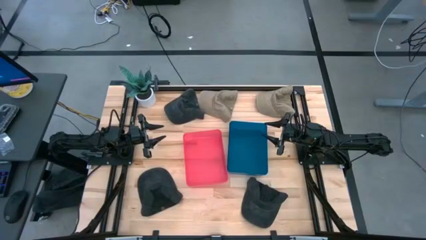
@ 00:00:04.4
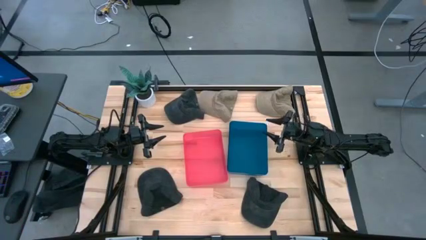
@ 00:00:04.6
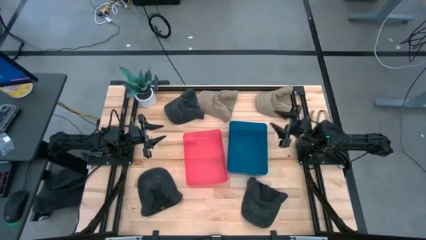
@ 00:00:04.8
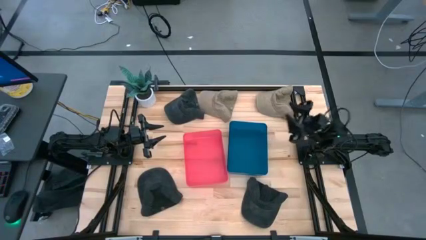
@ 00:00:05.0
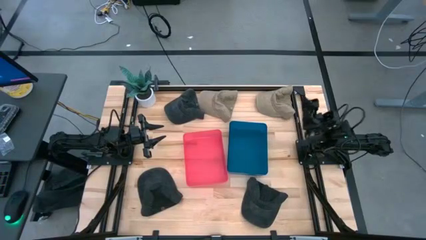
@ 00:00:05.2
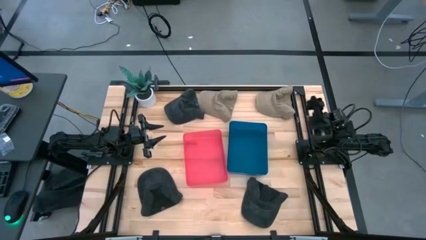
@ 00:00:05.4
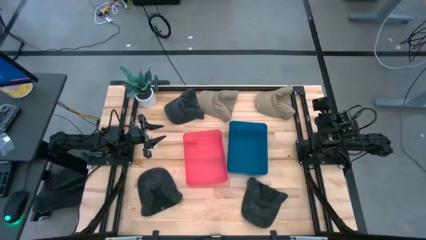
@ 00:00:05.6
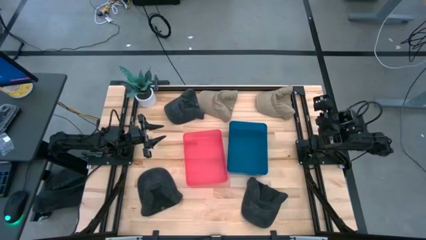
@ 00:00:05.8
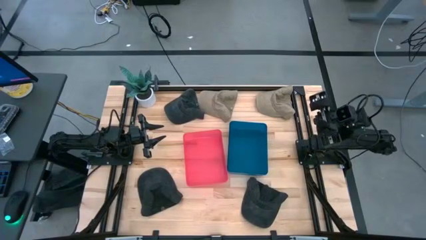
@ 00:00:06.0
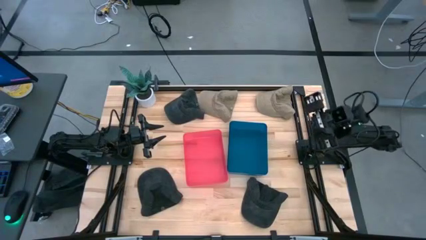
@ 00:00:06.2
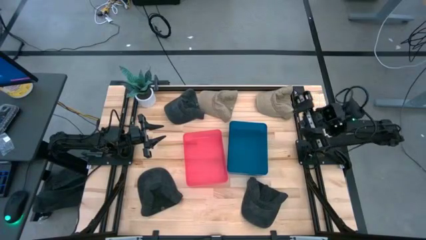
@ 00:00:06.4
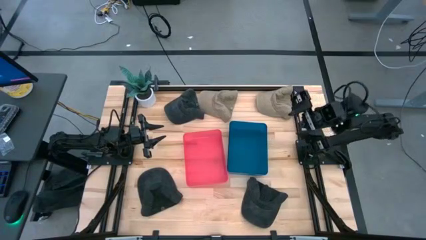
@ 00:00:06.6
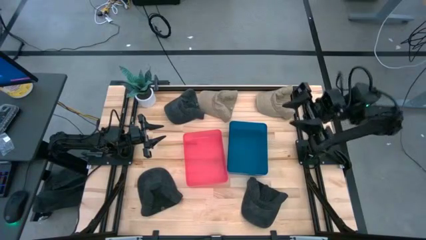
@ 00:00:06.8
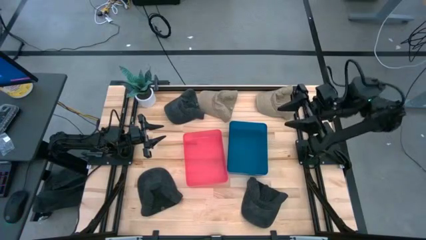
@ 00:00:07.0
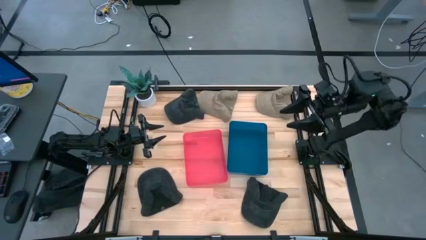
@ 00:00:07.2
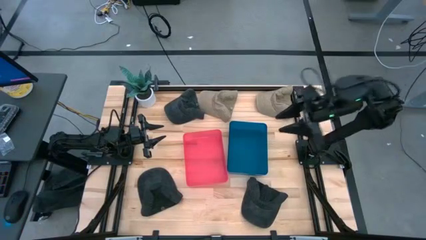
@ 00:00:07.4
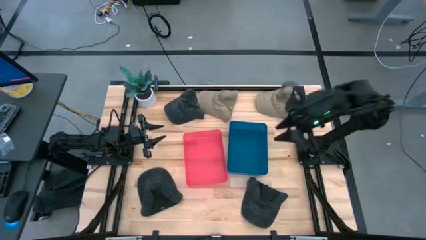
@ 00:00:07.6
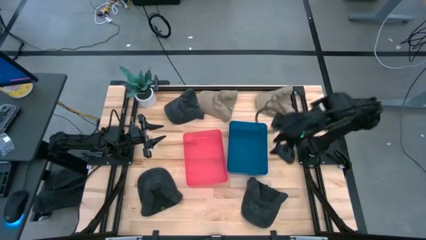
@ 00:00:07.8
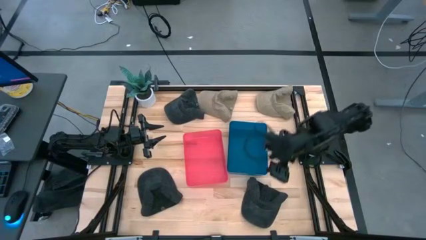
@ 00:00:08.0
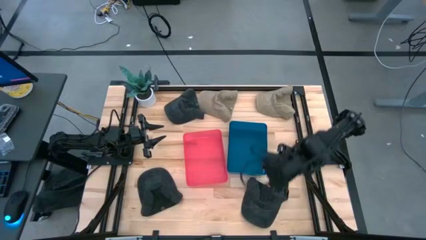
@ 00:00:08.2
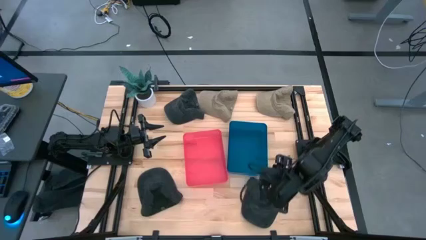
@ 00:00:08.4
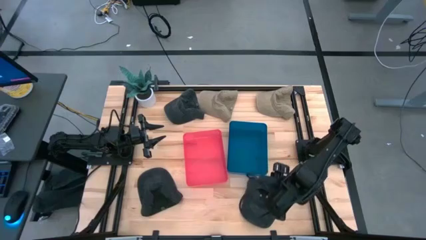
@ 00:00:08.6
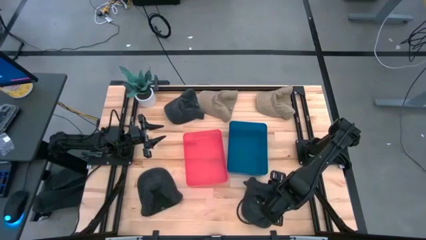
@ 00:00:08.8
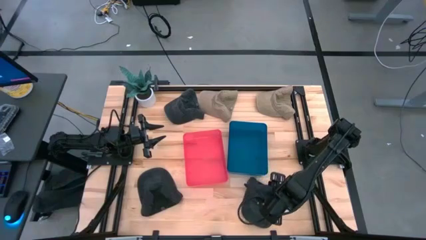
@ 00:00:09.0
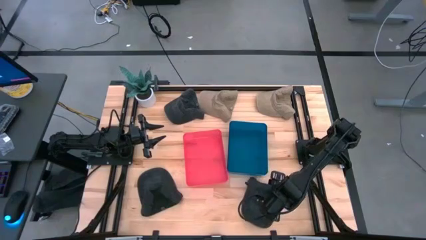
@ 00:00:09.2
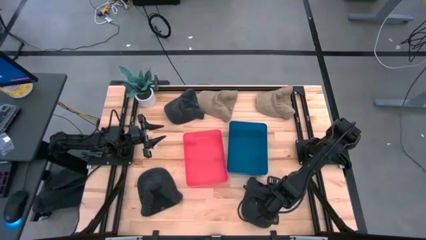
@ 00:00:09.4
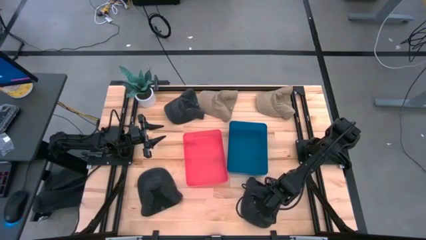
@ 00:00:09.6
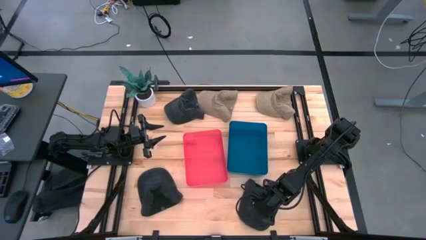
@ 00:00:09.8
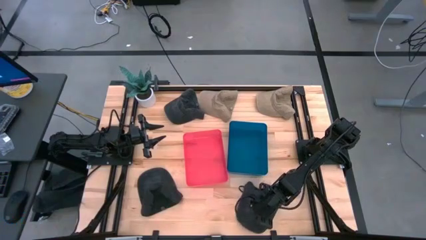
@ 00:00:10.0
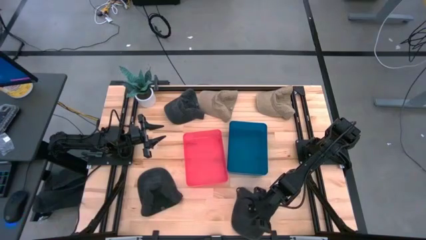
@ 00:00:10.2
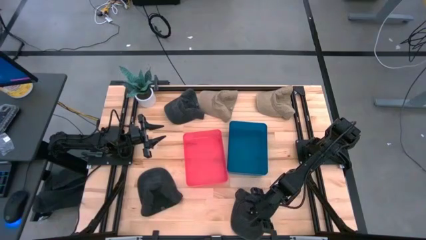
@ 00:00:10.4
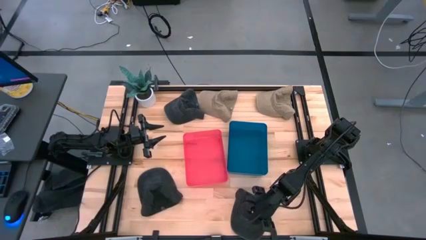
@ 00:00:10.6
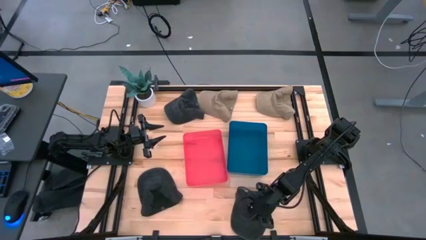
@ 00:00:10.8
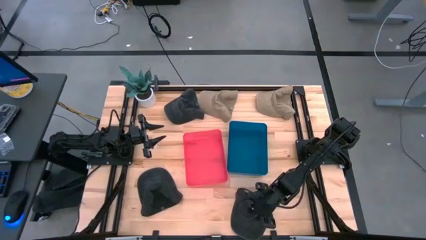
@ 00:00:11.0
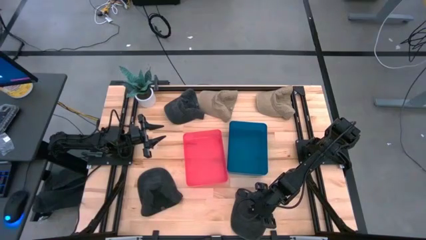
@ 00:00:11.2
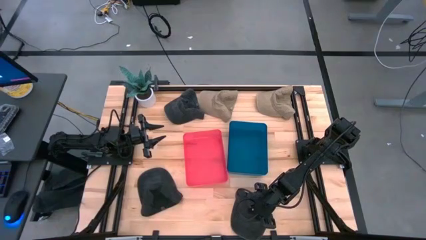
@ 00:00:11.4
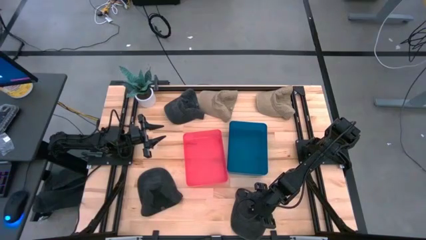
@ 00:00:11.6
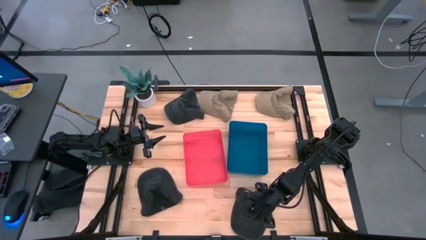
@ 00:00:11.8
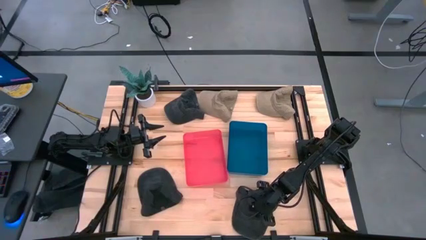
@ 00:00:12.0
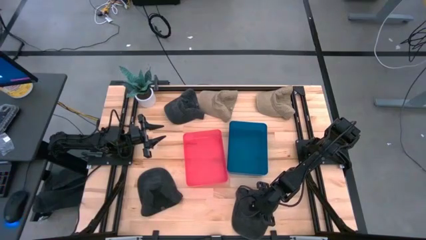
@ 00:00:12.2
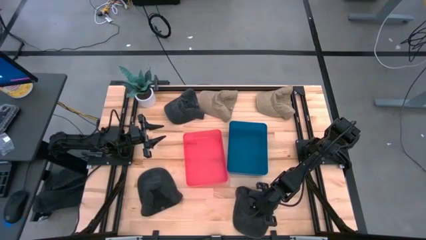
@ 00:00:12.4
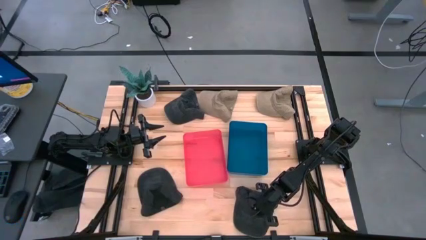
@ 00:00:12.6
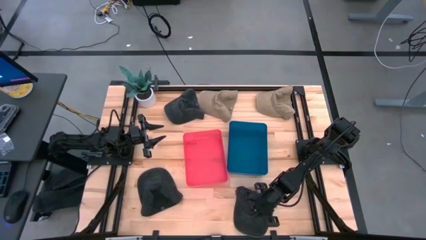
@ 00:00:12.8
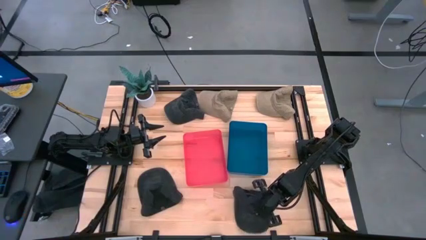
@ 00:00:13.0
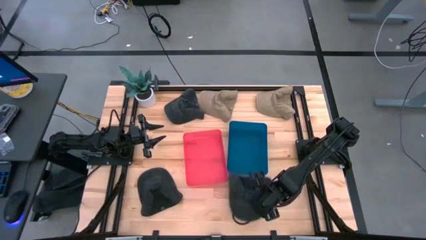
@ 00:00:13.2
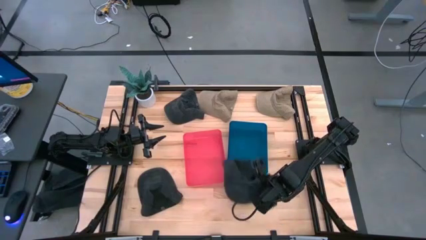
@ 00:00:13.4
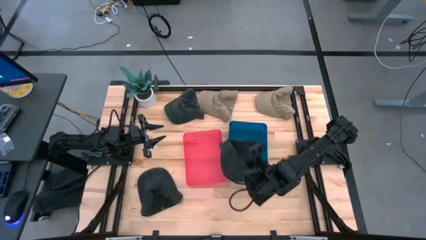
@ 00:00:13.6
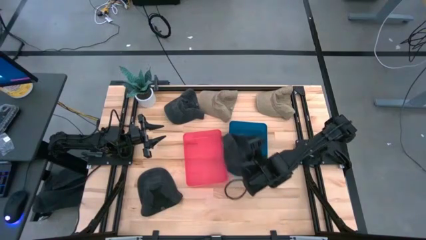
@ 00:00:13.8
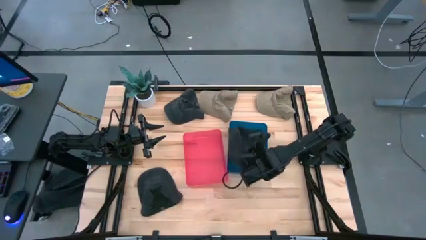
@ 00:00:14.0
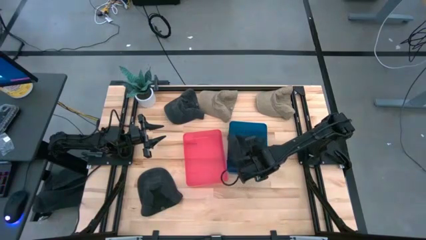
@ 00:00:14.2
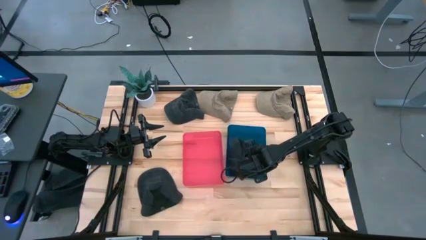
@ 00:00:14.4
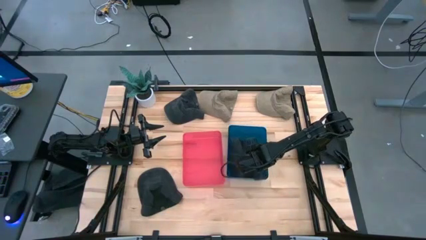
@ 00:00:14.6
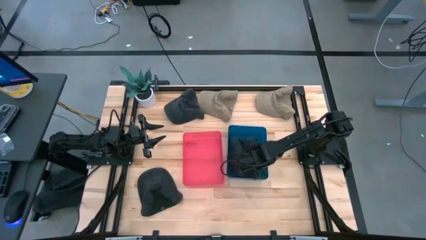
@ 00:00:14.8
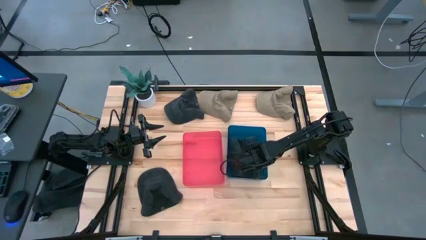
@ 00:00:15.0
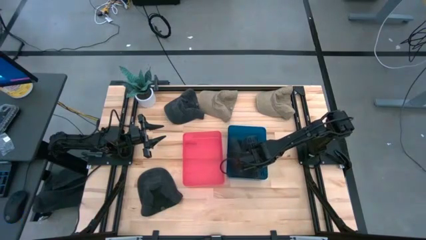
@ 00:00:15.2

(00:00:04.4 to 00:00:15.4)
Task: Pick & Place hat
Put the bottom right black cap into the blue bin

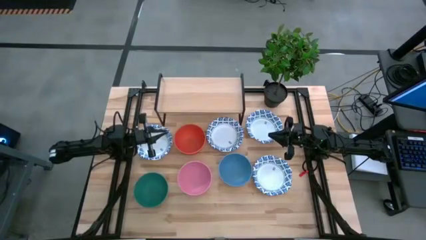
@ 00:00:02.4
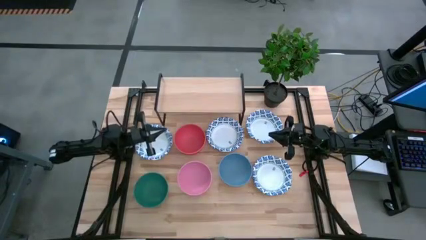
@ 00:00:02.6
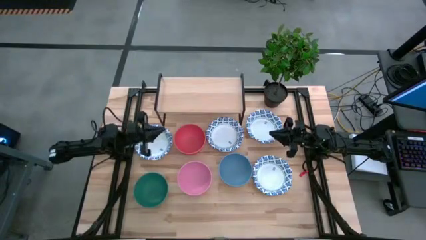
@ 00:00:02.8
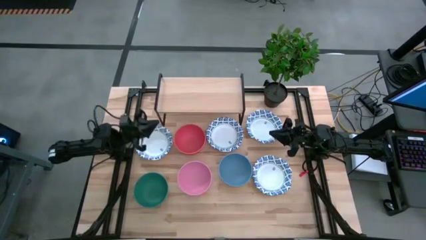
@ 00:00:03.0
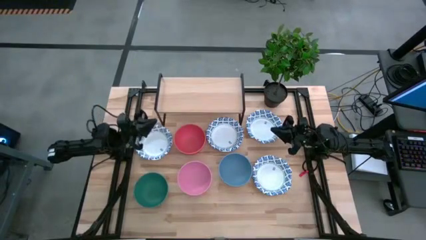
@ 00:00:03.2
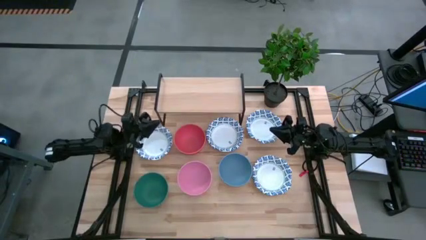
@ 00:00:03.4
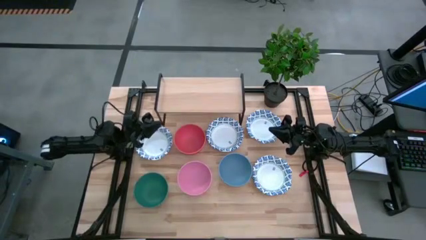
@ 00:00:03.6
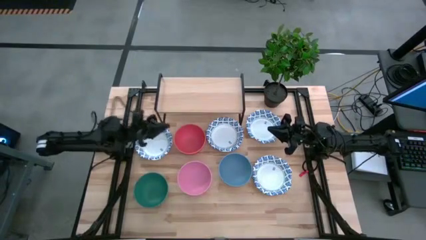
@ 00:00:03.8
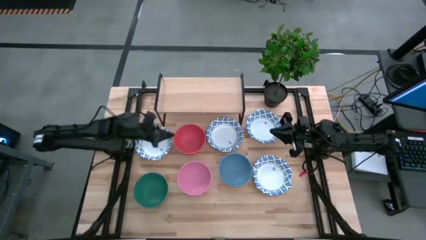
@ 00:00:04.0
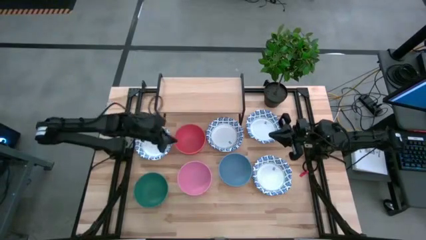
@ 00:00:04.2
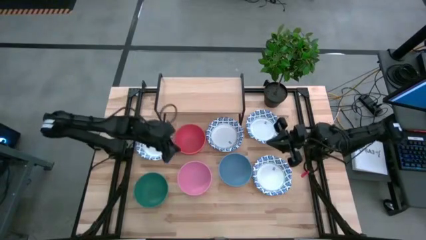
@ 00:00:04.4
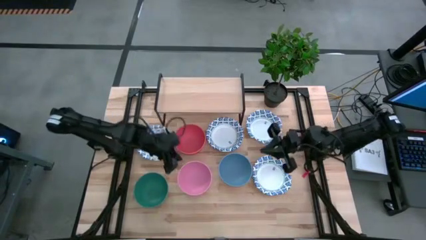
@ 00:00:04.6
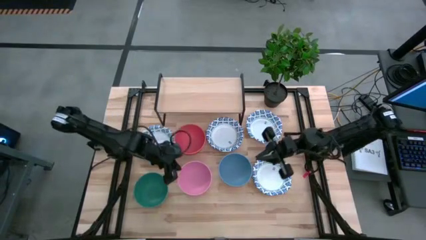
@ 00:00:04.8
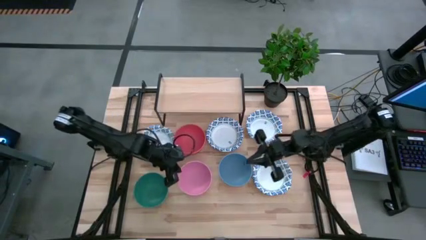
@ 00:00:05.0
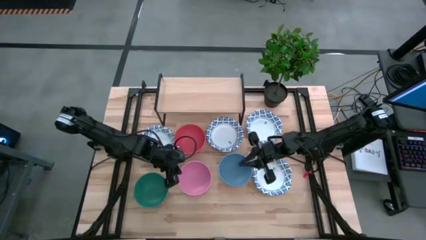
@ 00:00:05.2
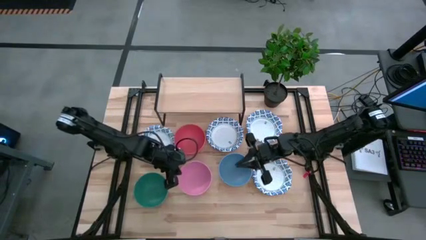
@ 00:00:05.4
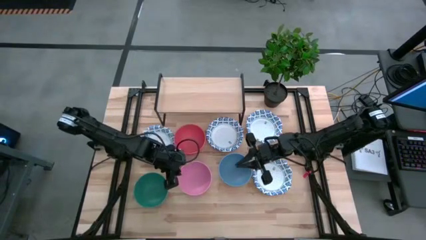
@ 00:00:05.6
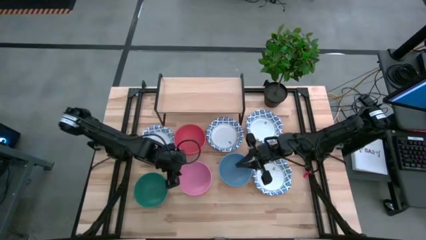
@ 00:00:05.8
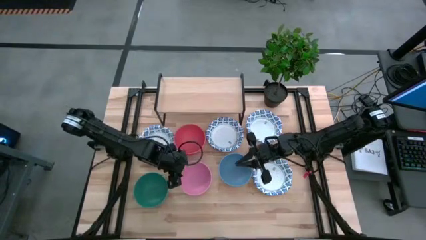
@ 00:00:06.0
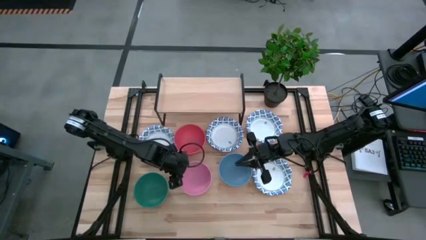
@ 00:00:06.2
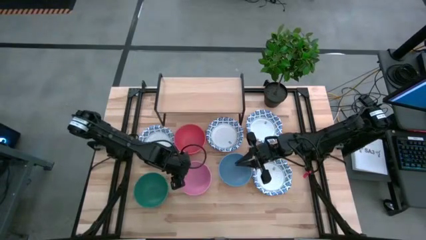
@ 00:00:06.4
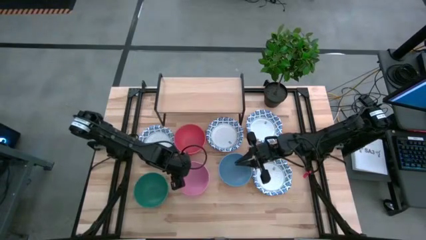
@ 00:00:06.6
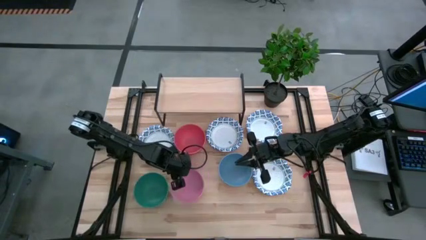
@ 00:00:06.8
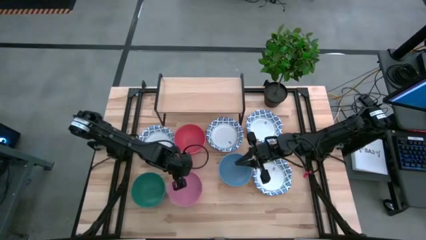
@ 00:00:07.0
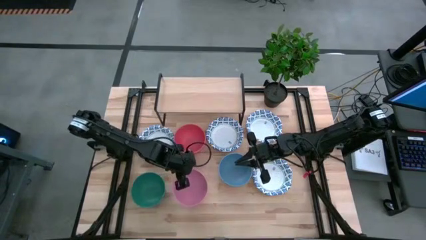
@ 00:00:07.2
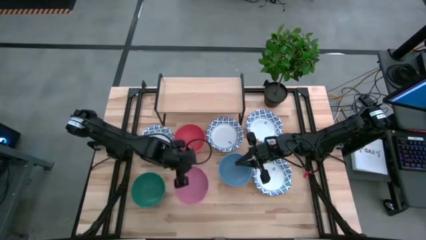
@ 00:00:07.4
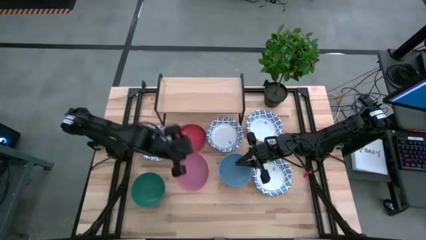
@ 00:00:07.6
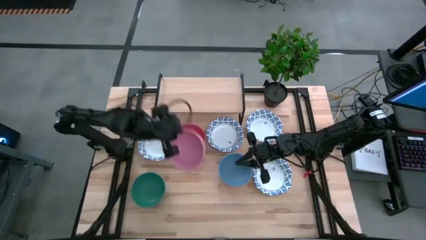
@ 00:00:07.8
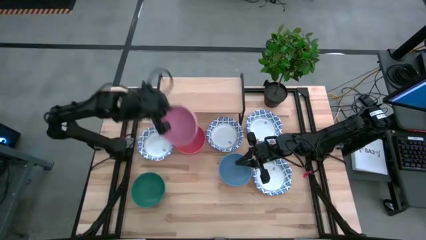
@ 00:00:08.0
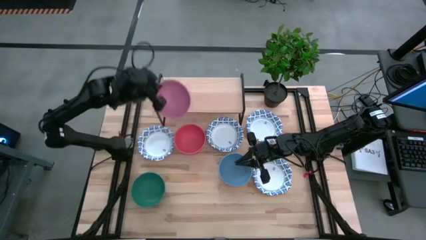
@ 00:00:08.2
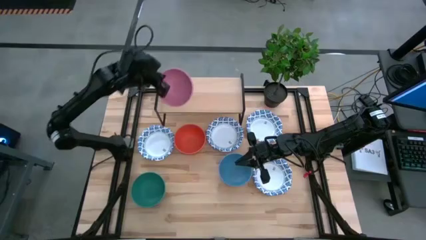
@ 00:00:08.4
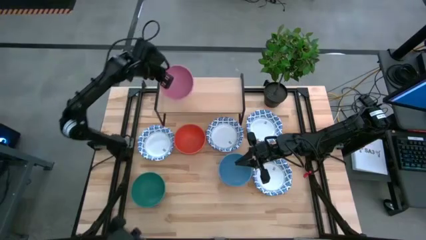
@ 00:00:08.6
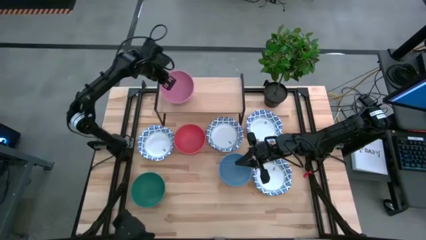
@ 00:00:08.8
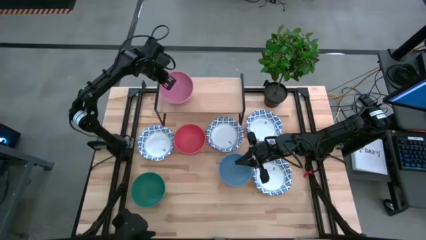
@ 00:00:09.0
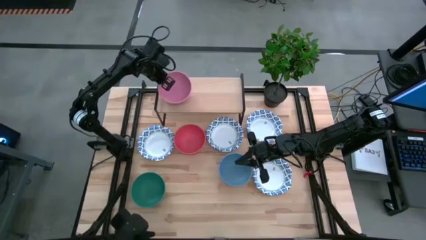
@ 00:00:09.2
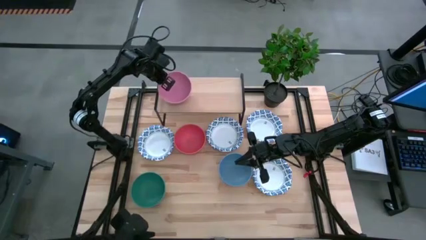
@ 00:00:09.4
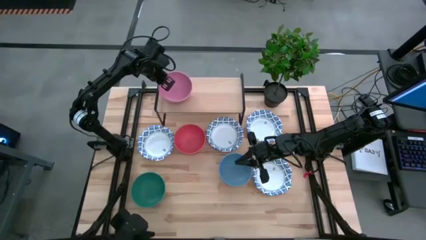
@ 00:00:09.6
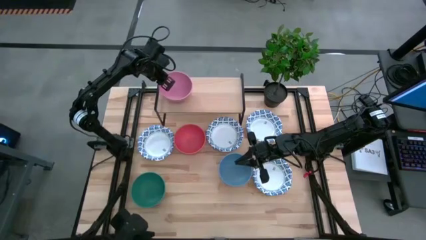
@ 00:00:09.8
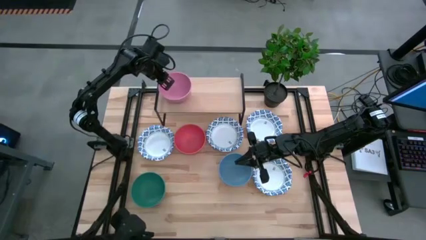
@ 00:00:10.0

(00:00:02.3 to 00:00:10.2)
Task: Place and stack bowls onto a shelf
Put the pink bowl on the shelf
